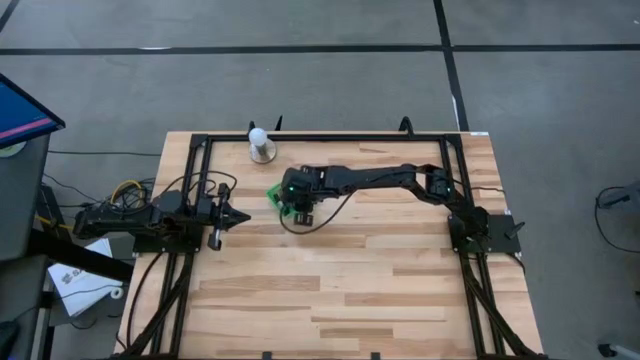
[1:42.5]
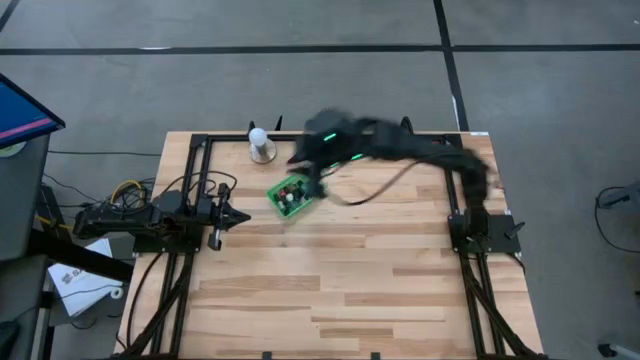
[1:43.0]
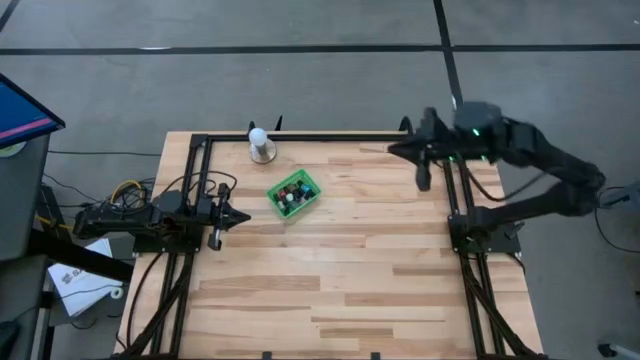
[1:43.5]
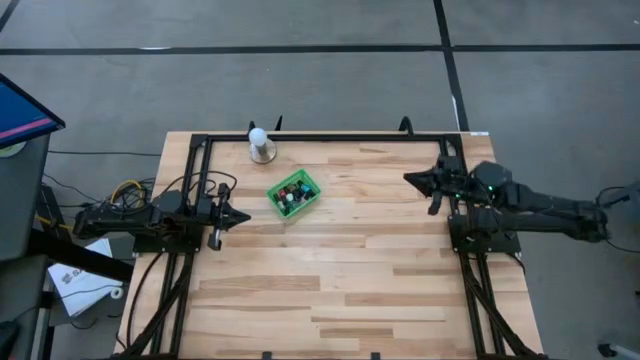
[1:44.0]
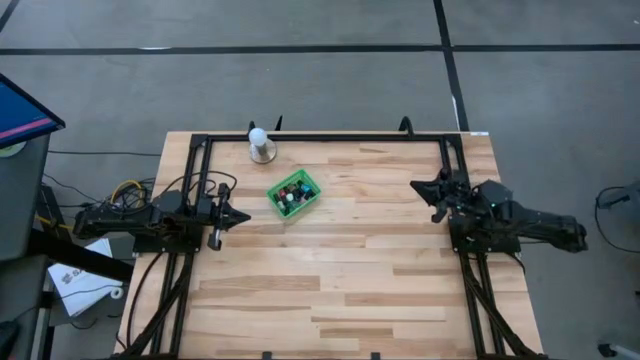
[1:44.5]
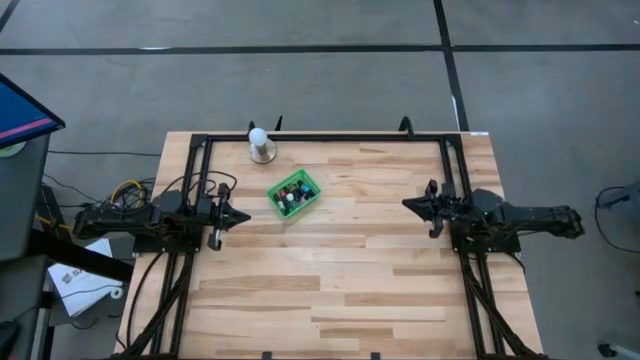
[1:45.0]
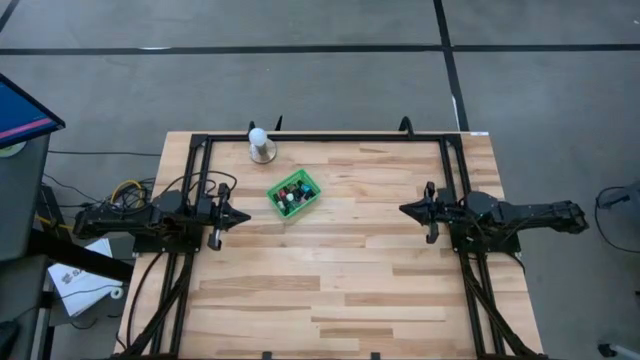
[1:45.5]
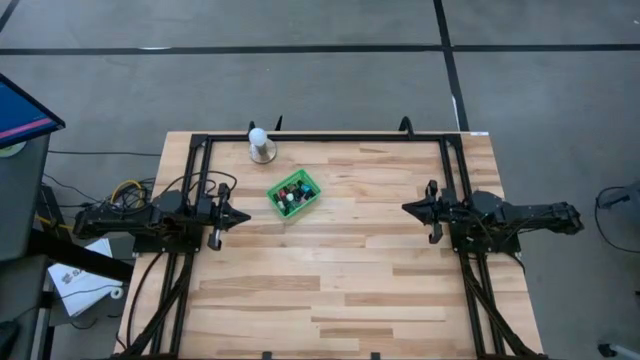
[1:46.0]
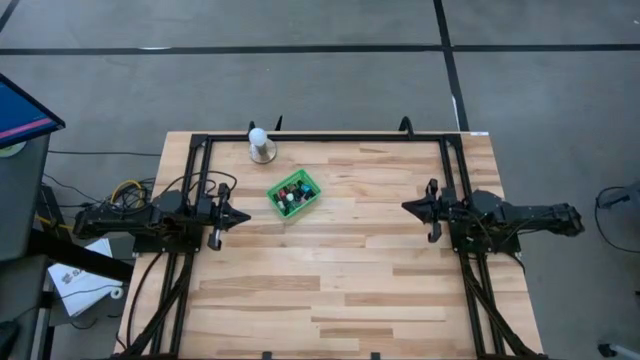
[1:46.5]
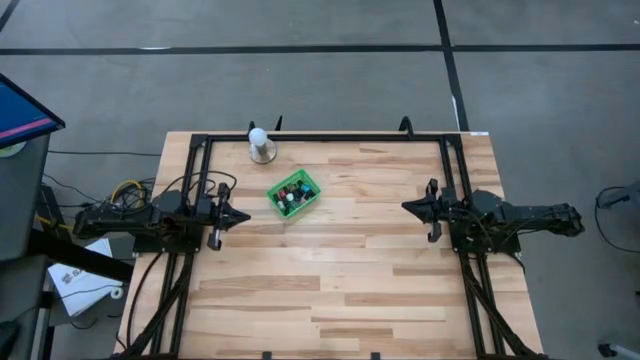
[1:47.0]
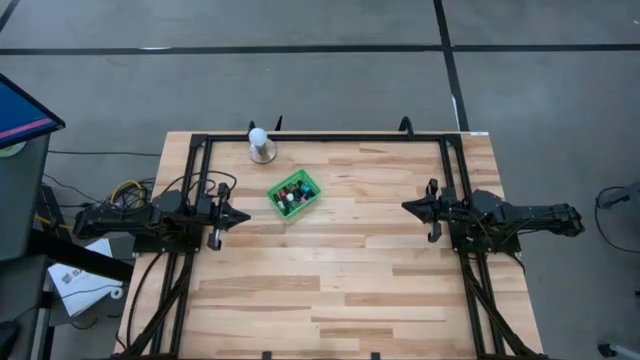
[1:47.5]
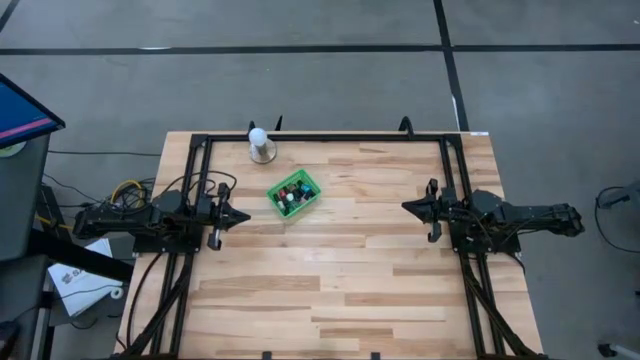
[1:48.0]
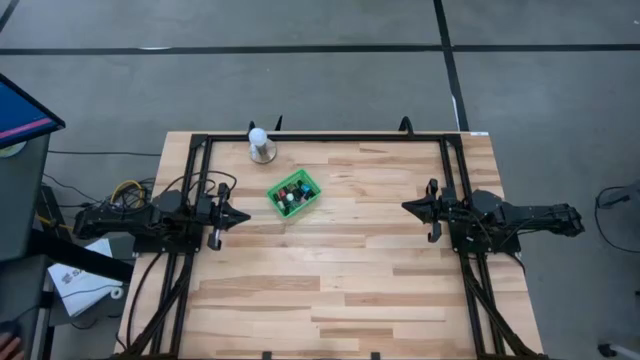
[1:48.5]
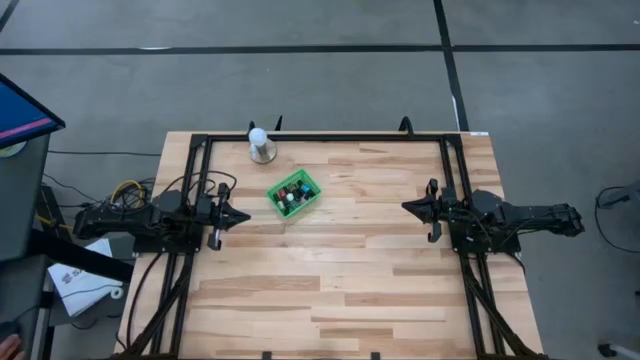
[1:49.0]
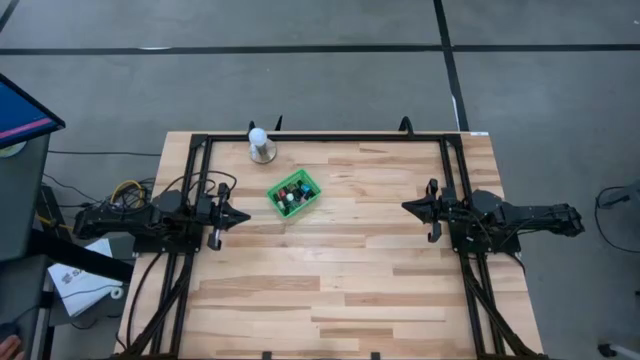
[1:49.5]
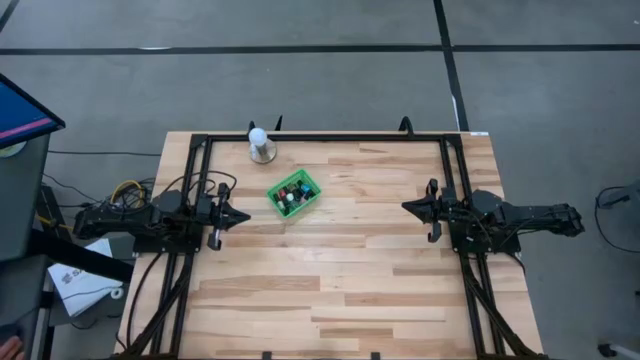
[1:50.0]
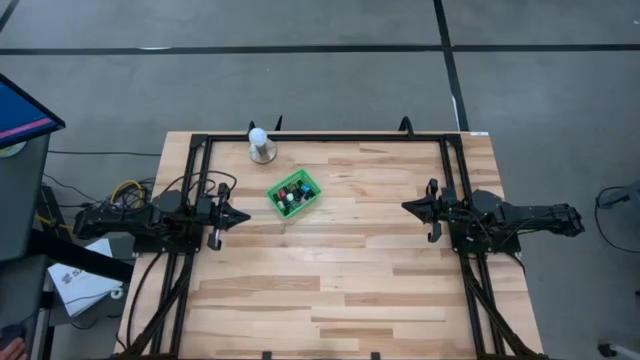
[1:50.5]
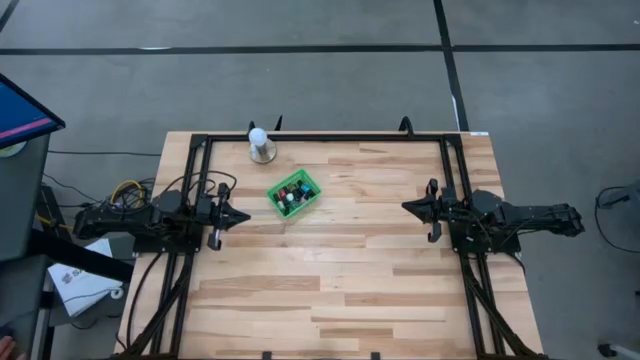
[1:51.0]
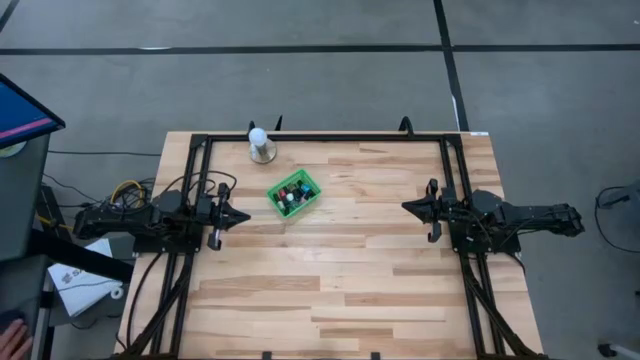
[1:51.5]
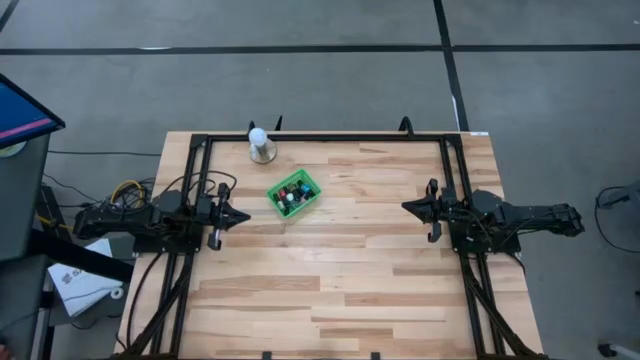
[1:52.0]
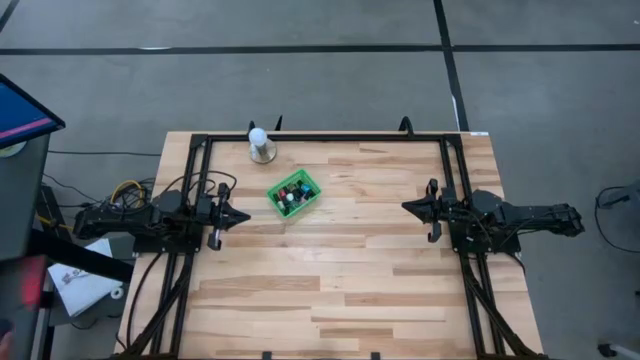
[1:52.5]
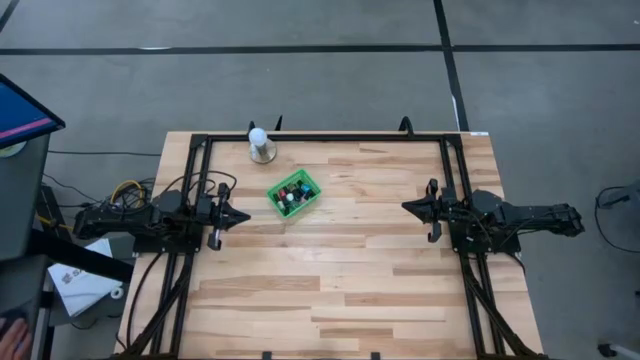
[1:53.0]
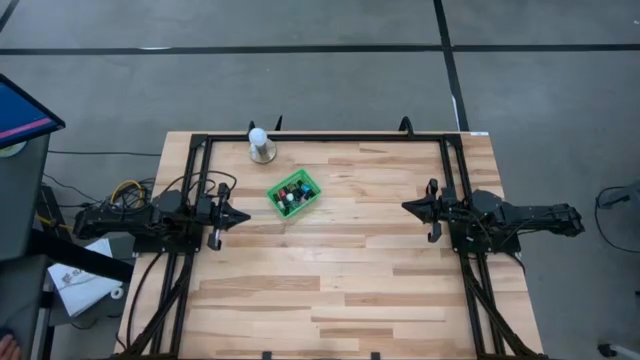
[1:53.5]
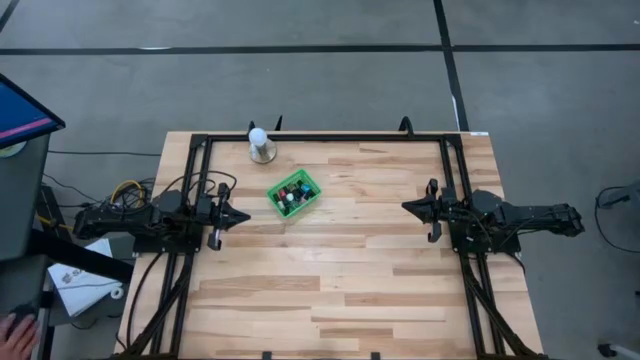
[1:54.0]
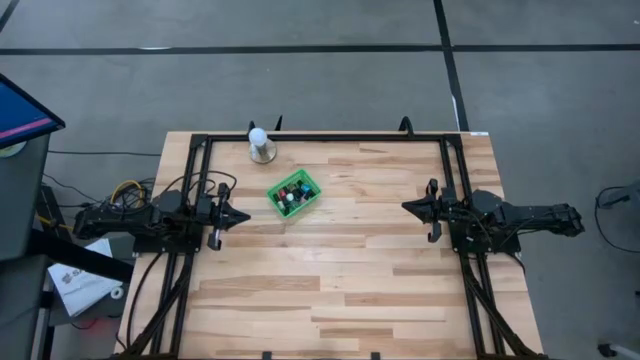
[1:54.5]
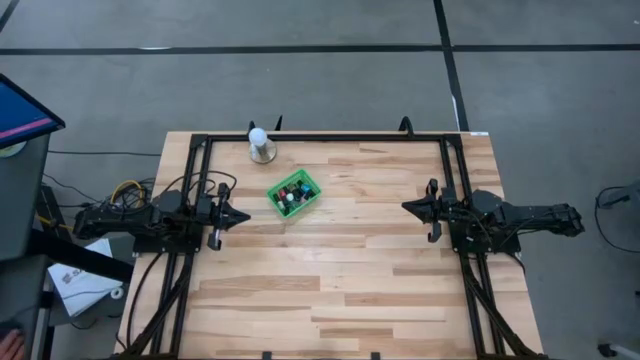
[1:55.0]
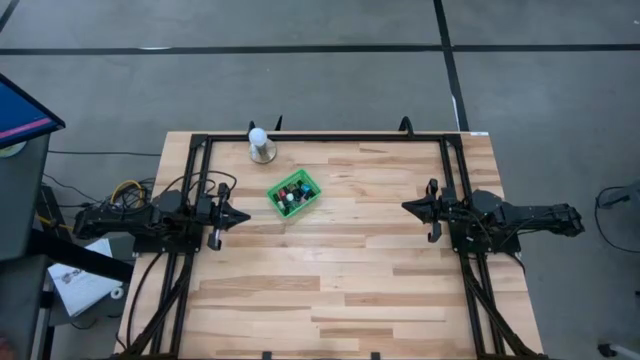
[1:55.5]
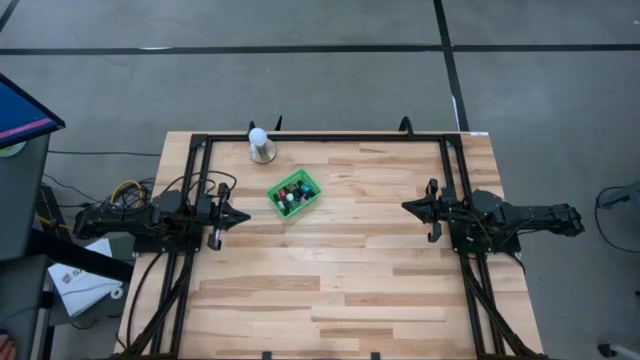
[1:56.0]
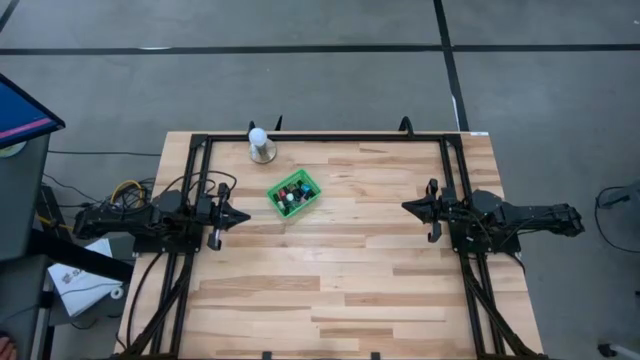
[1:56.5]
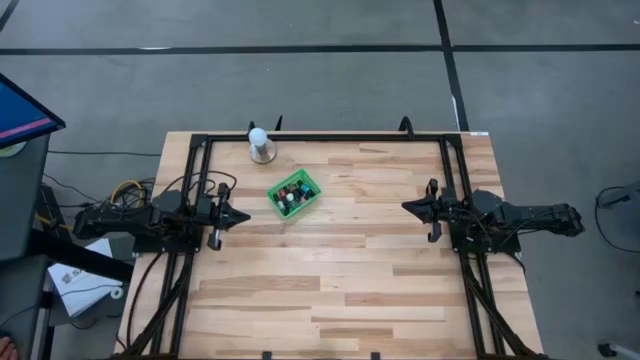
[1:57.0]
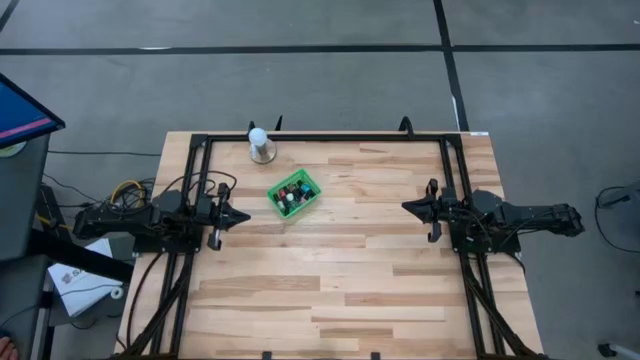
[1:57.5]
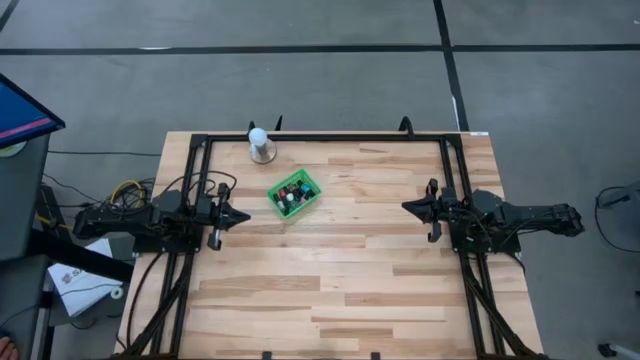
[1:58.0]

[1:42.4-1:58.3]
Task: Pick & Place Nail Polish
Return to Home Position

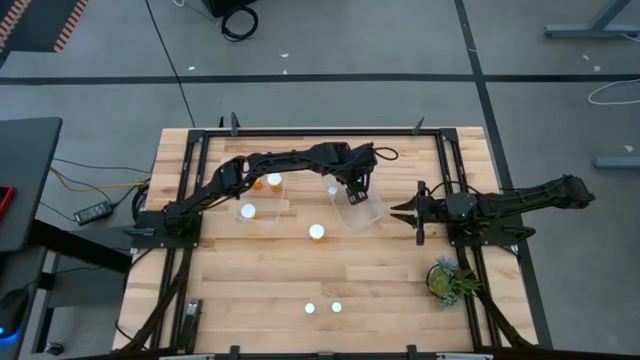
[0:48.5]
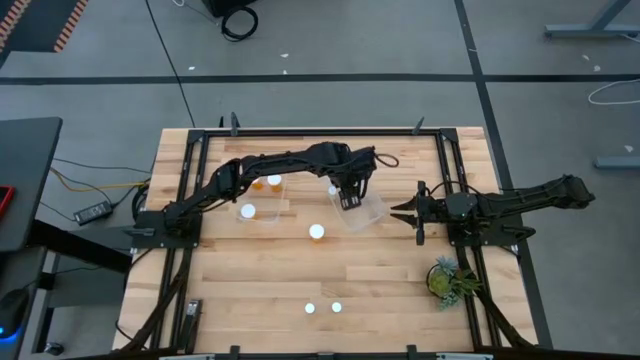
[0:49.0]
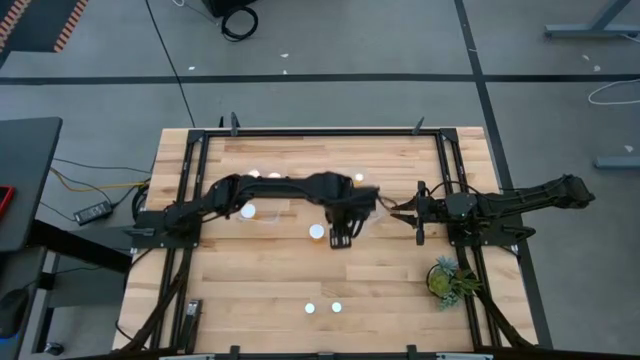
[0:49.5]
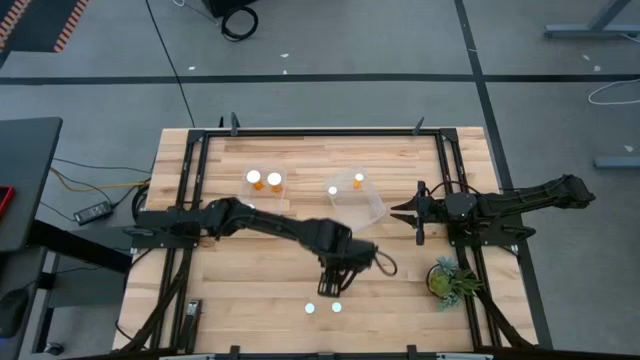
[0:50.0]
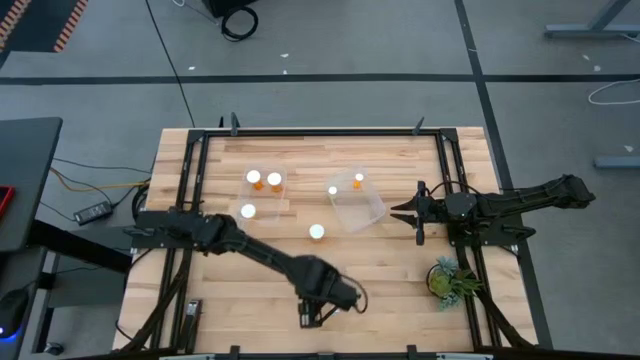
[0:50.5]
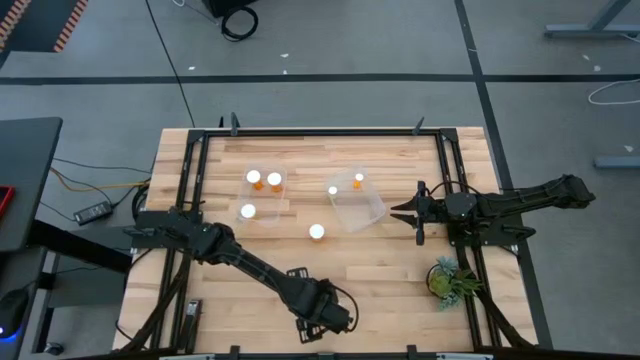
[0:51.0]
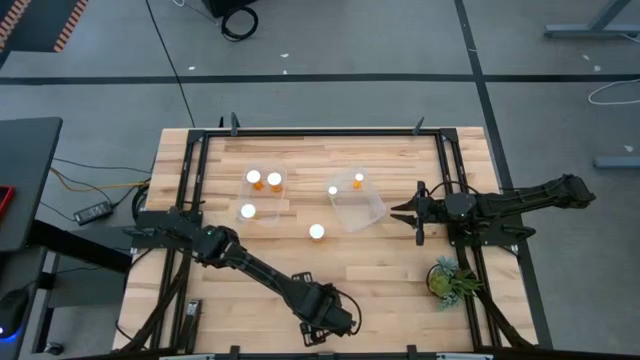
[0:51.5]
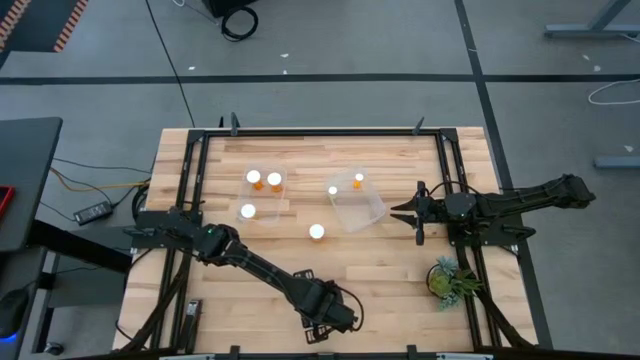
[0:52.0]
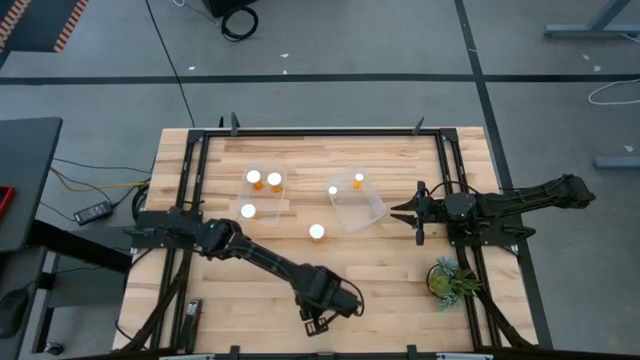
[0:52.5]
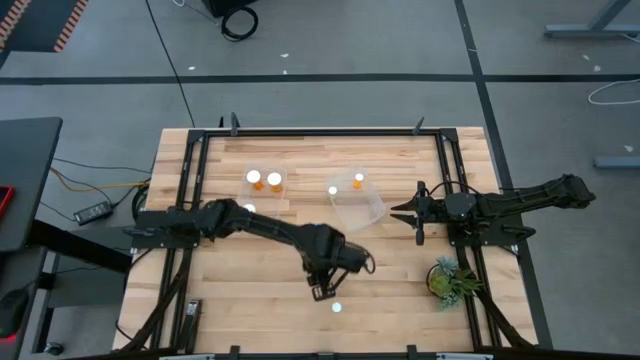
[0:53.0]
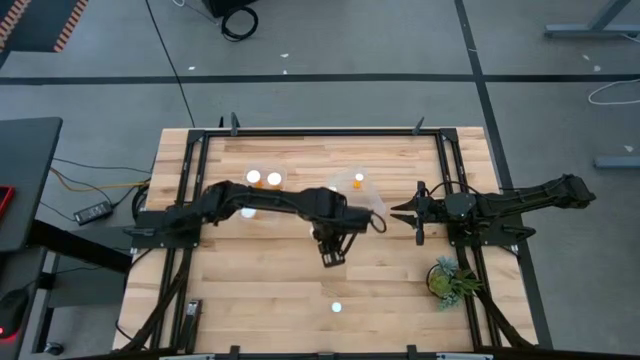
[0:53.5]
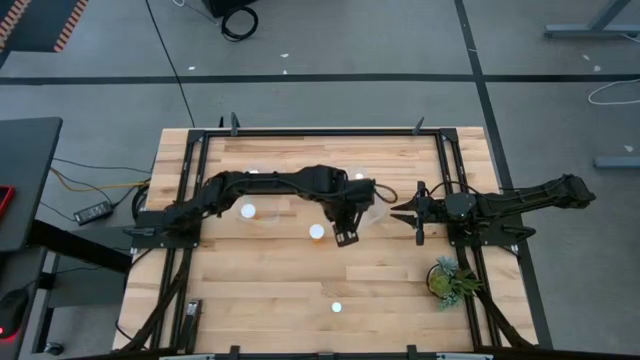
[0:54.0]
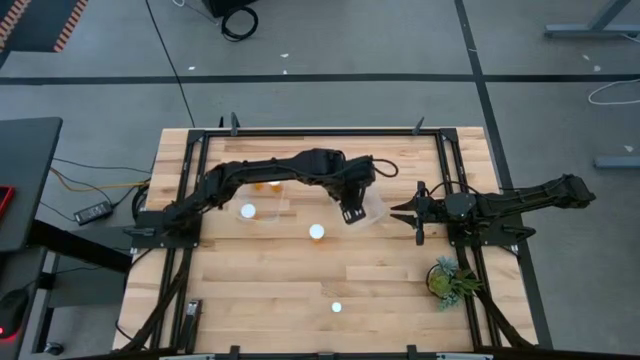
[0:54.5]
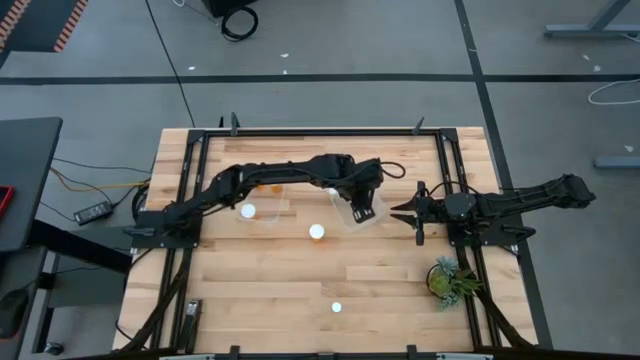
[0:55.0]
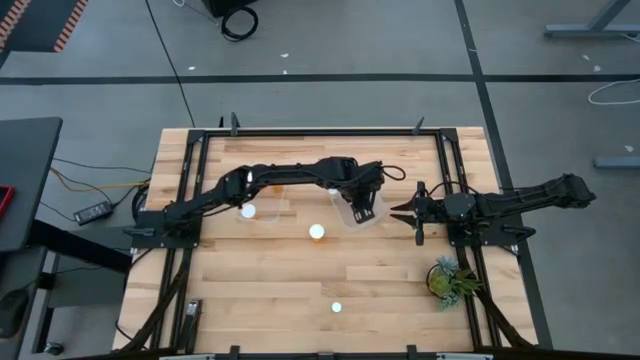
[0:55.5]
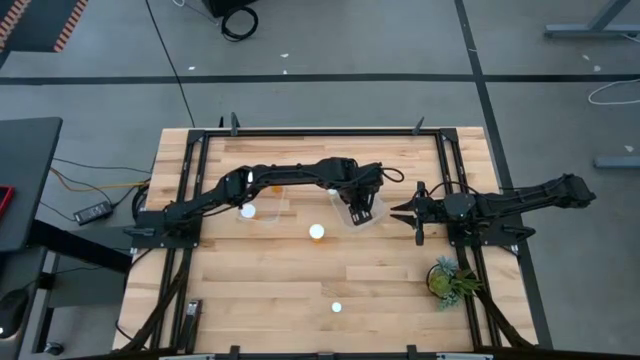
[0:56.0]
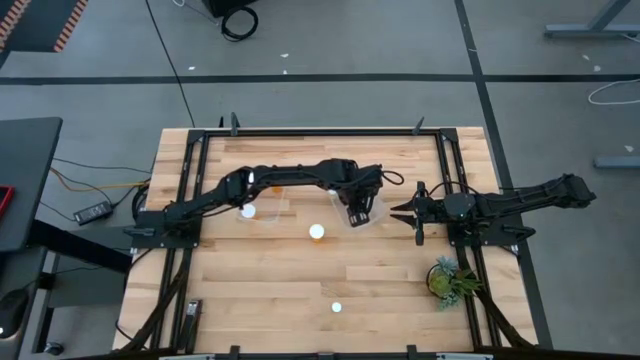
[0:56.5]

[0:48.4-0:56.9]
Task: Pick and place medicine bottles into bin by pill shape (circle, oval)
Put the small yellow pill bottle into the right transparent bin
